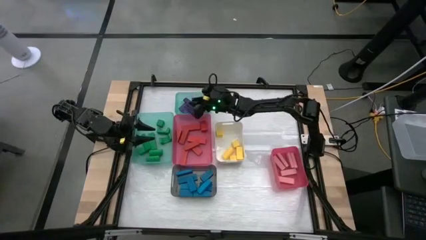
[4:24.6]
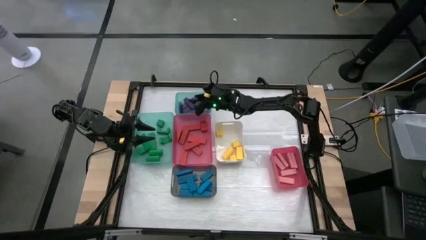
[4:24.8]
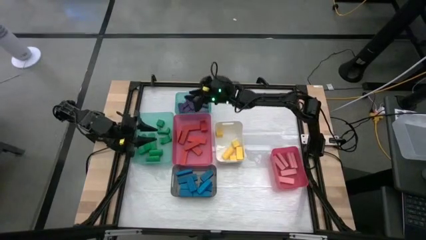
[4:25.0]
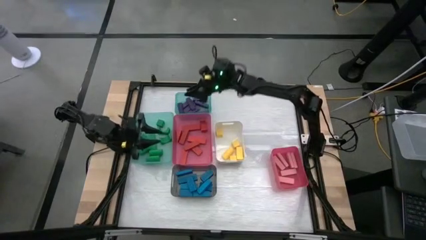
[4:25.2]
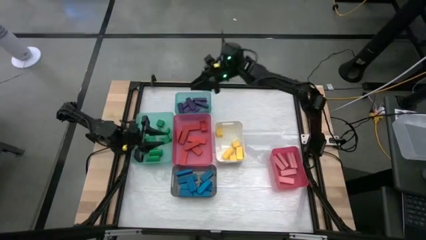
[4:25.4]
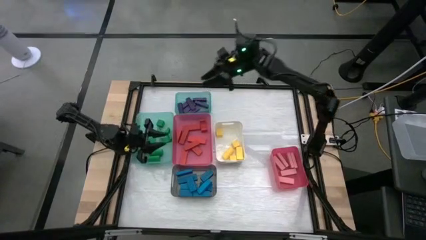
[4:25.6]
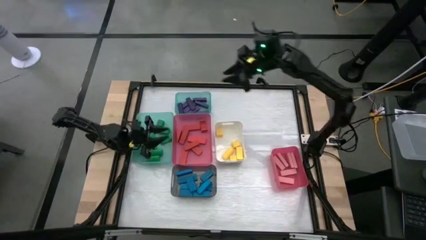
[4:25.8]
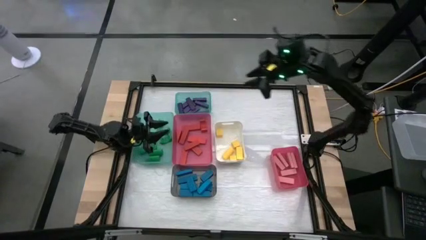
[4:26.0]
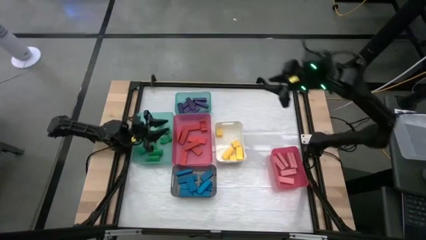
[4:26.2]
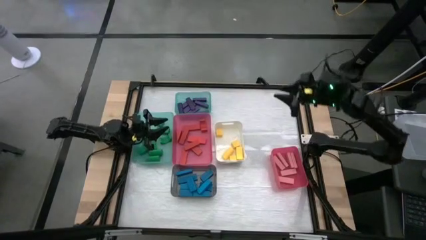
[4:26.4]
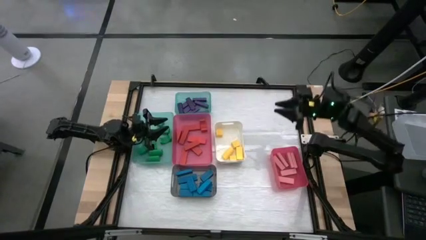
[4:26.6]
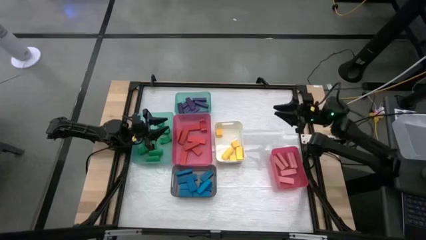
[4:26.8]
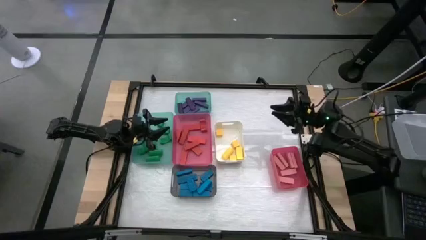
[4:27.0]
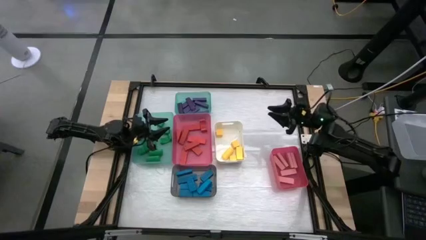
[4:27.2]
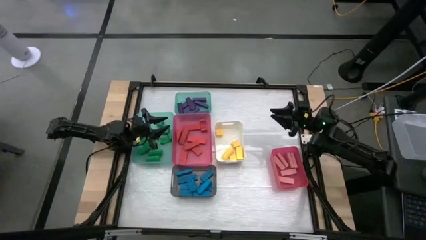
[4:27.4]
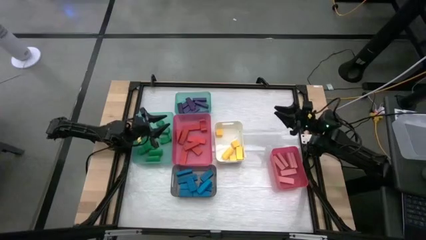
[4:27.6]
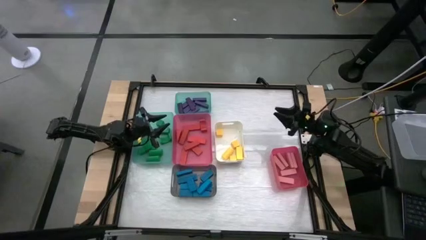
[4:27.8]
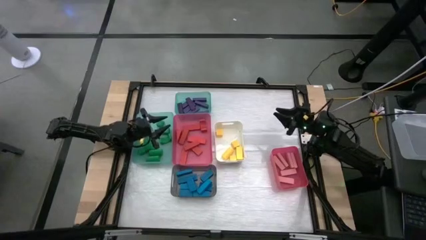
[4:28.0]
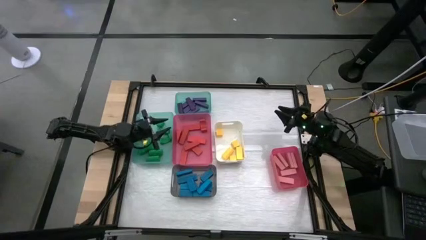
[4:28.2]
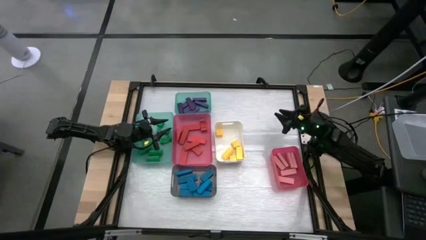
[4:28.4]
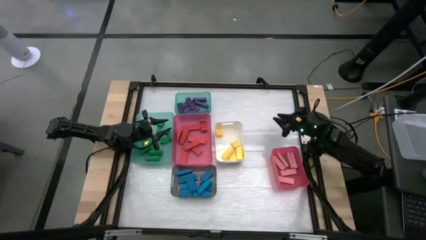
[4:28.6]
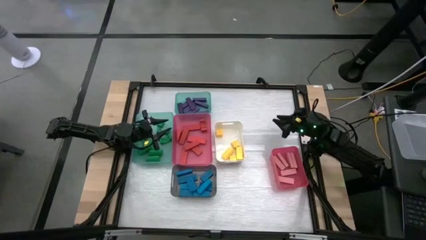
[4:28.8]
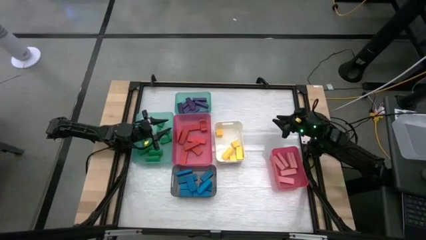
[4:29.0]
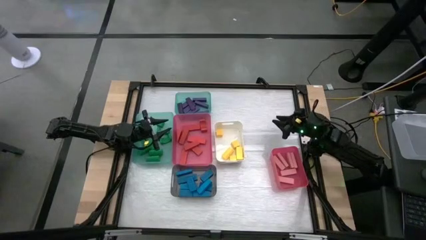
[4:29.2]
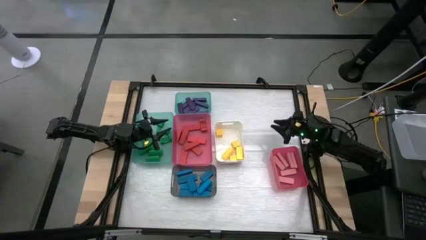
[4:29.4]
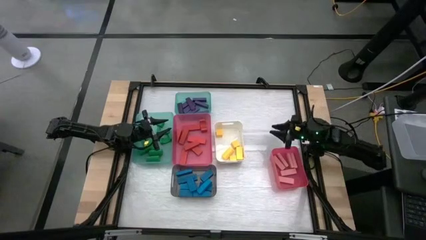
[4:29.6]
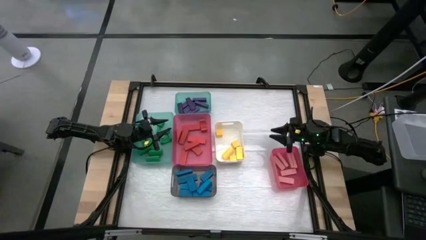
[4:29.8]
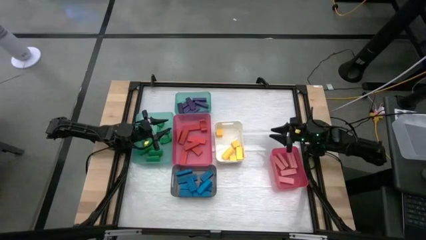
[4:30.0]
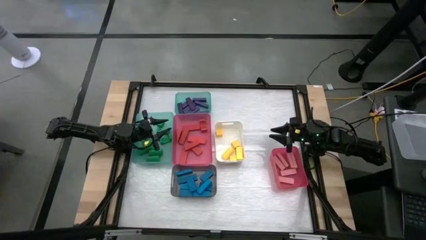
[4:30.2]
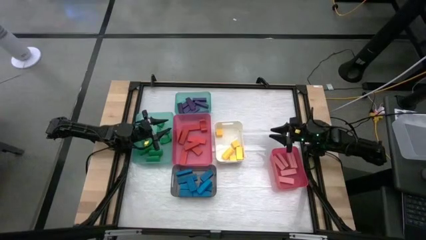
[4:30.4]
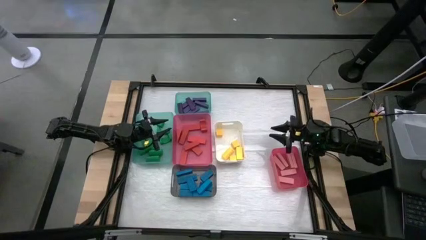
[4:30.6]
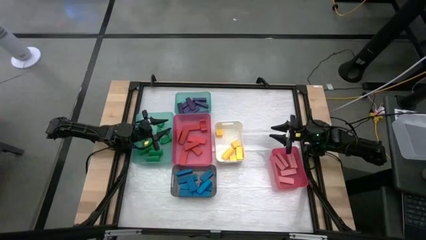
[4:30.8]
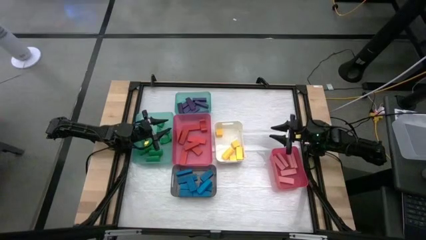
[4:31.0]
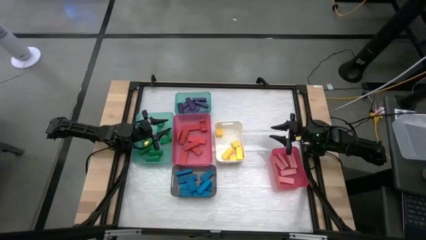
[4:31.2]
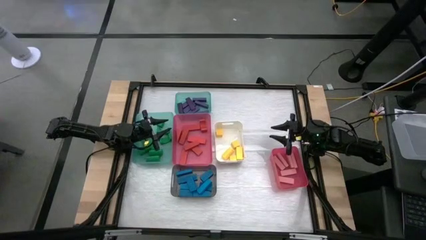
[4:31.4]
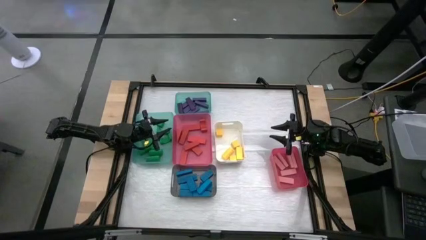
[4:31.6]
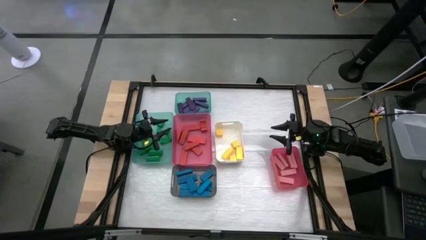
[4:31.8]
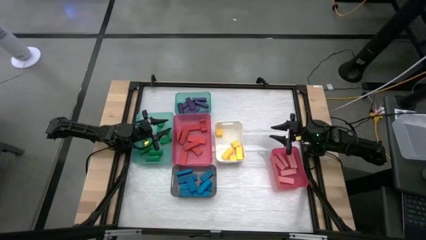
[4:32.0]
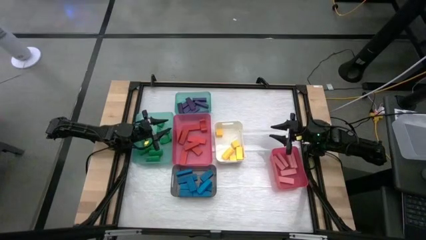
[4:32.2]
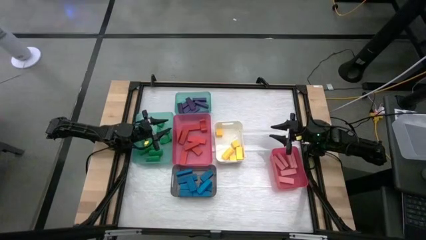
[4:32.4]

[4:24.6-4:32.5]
Task: Sort blocks
Return to Home Position

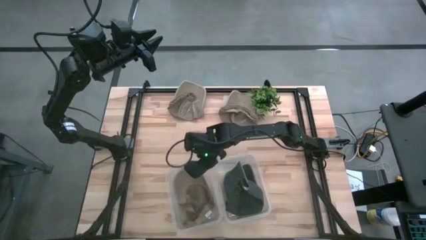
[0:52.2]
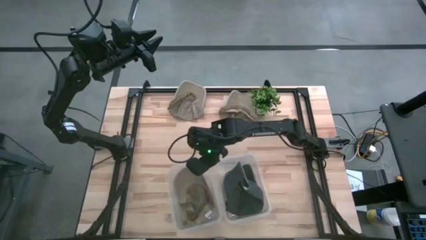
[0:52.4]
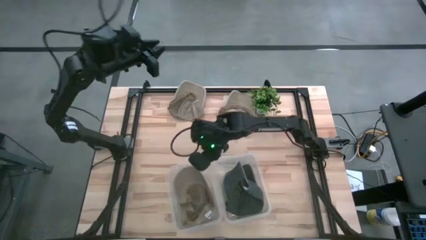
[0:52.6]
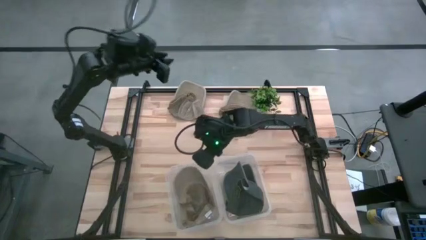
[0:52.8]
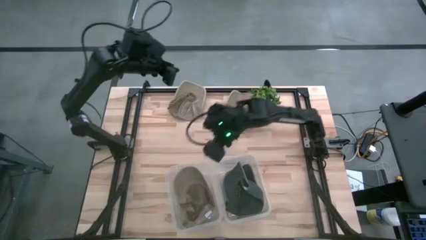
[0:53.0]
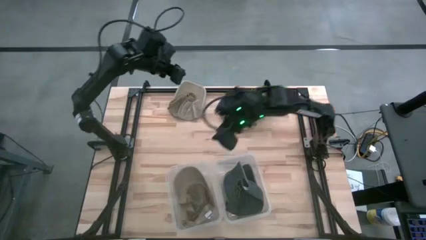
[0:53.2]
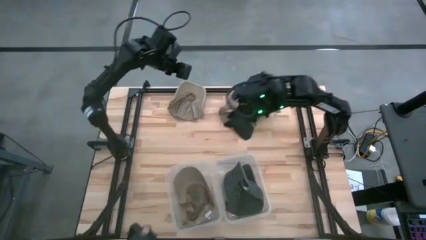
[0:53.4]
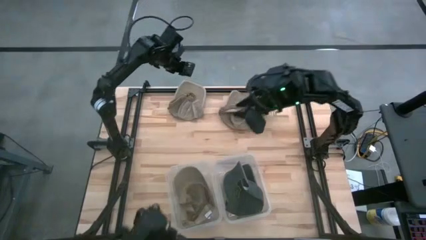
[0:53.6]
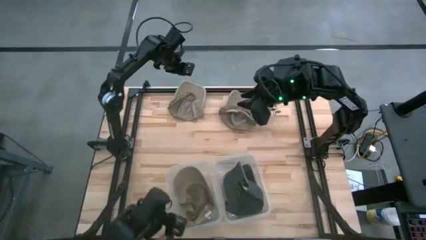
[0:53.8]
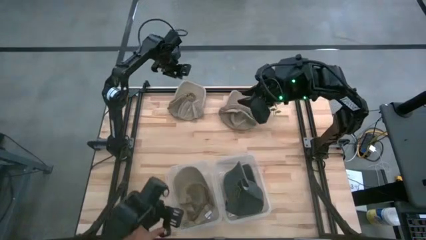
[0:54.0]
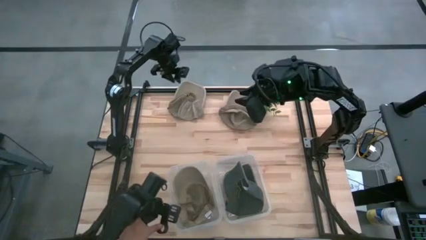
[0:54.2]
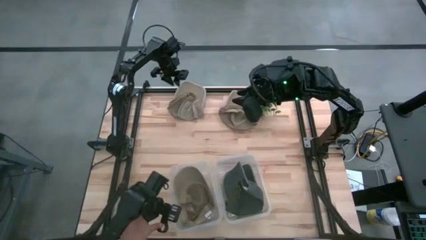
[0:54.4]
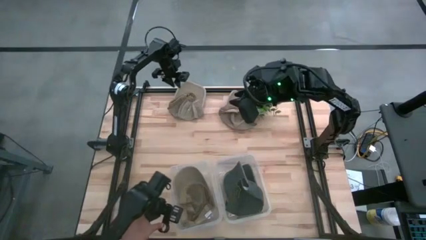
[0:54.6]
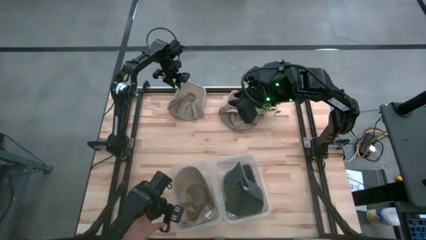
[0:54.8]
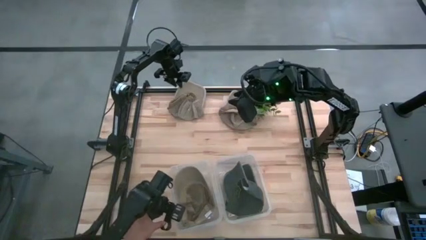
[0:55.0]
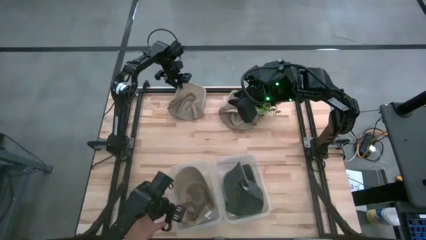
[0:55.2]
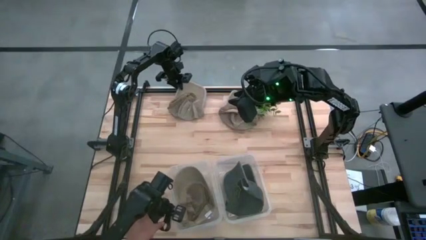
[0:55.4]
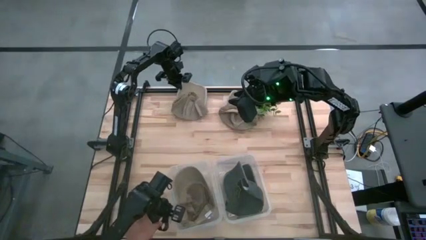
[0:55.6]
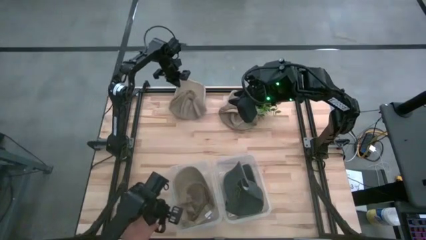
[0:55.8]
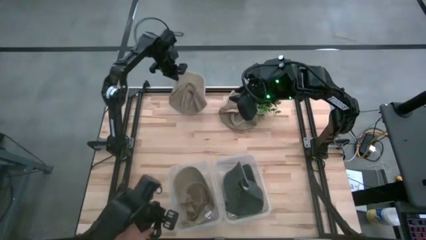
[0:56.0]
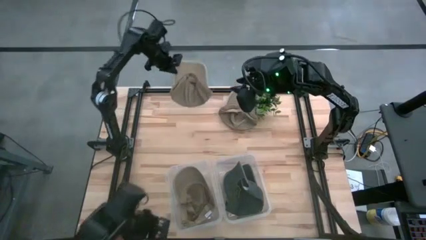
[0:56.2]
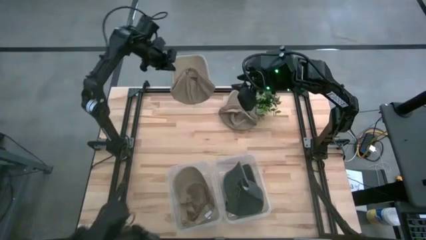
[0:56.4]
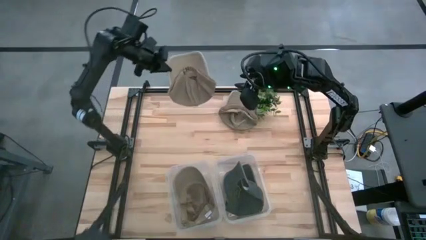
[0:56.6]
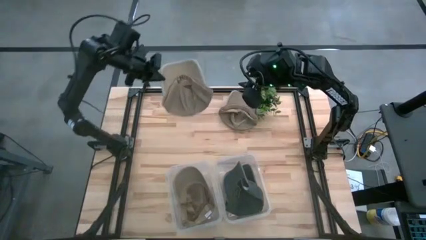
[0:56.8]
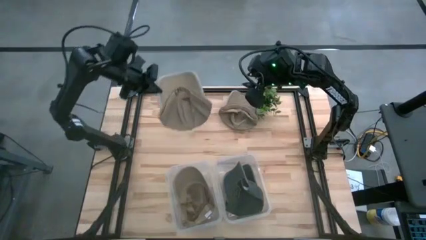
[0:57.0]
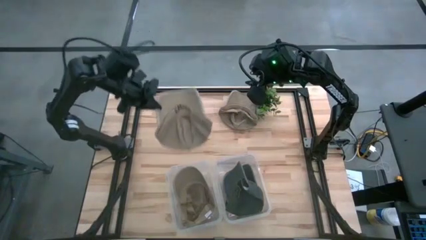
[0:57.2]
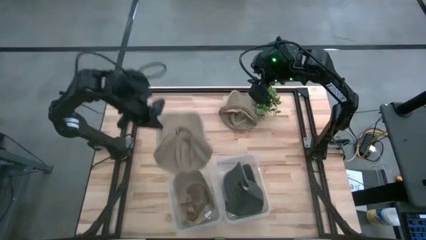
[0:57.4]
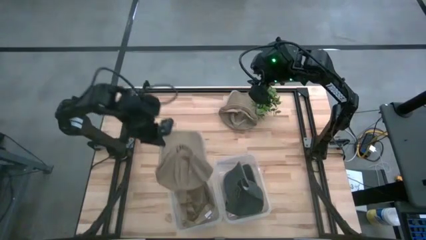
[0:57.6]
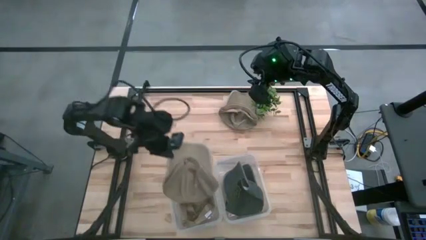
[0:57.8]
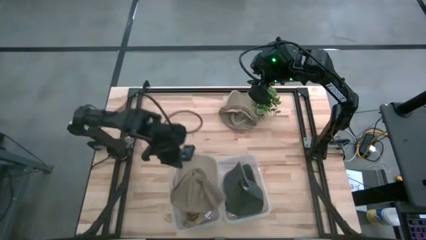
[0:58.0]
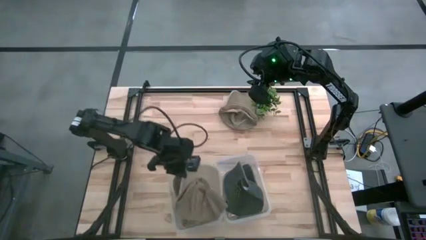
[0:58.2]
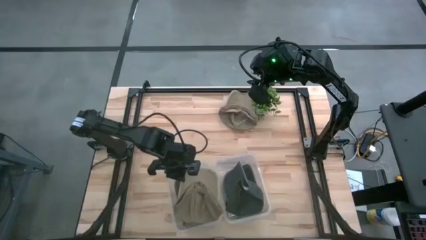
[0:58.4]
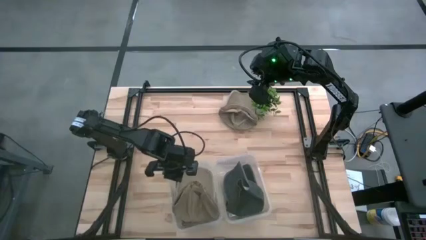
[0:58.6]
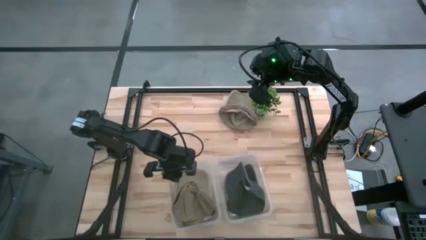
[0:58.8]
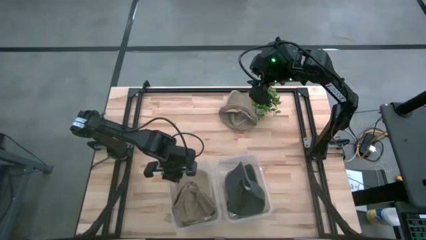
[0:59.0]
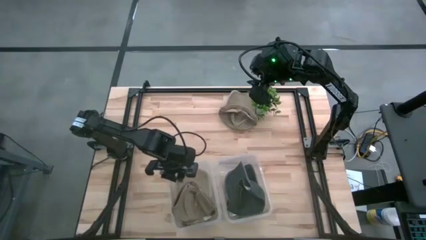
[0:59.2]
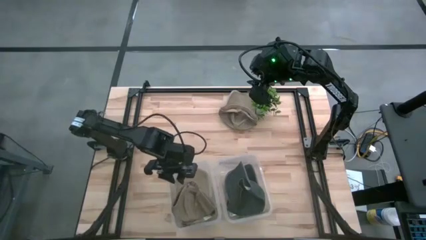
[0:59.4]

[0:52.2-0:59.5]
Task: Pick & Place hat
Put the left brown cap into the left transparent bin
